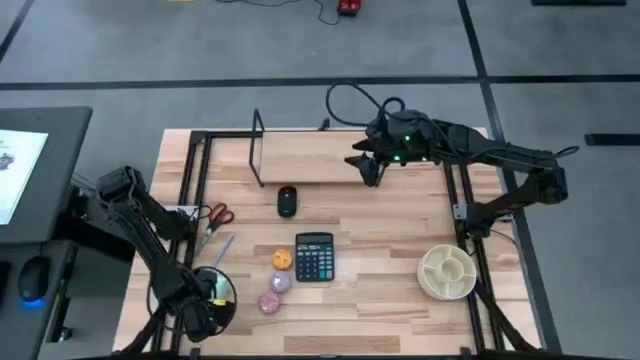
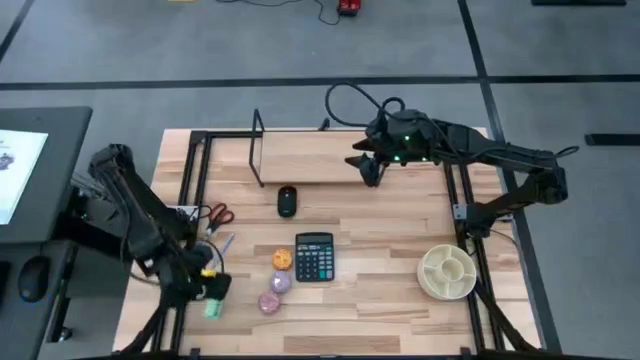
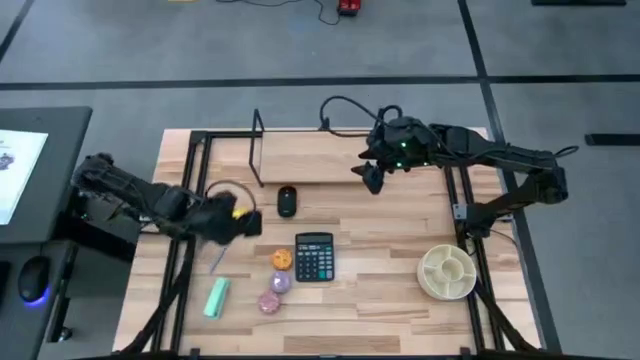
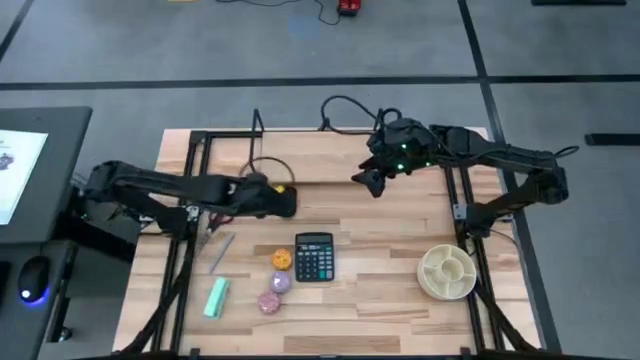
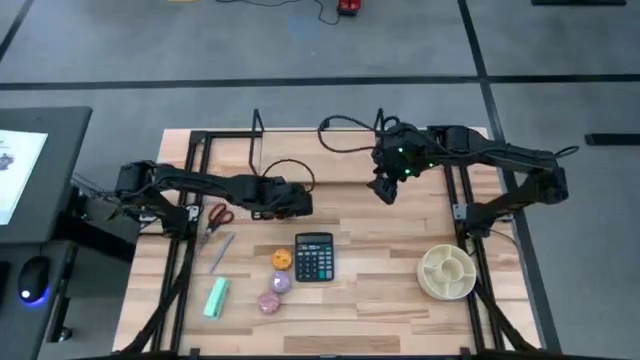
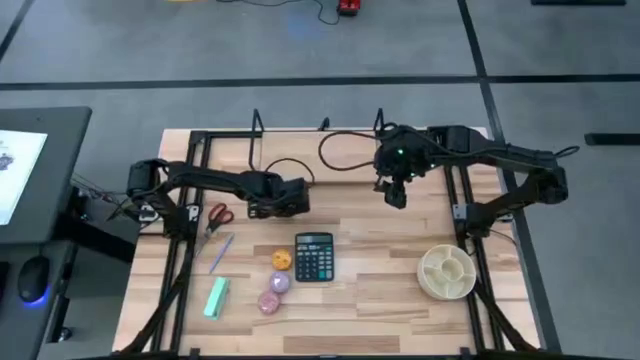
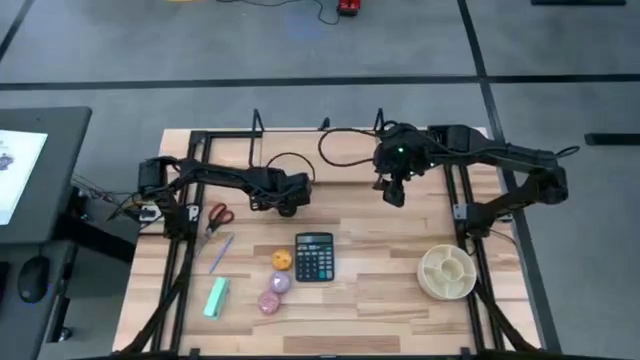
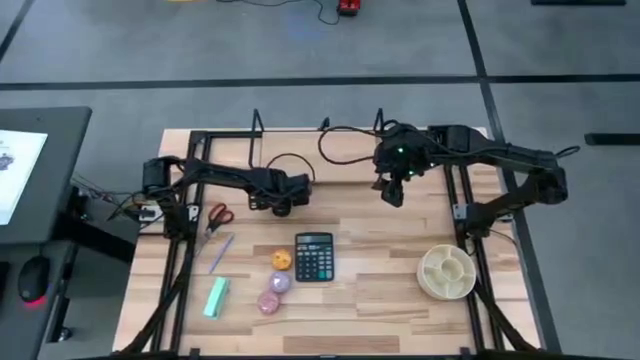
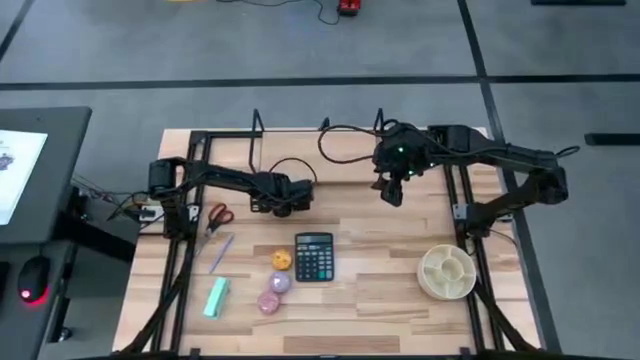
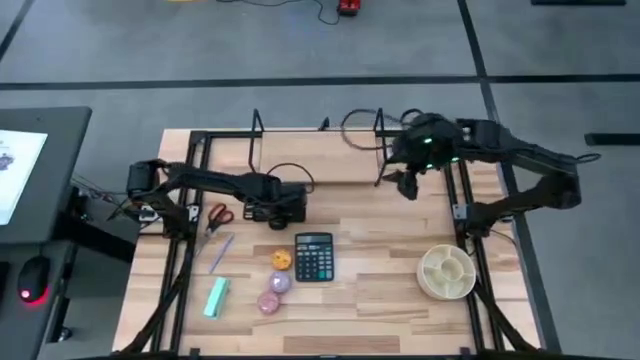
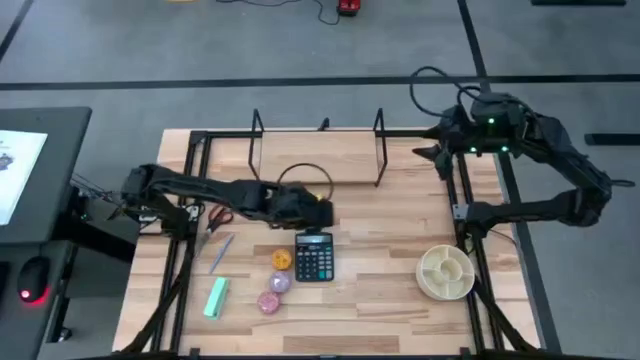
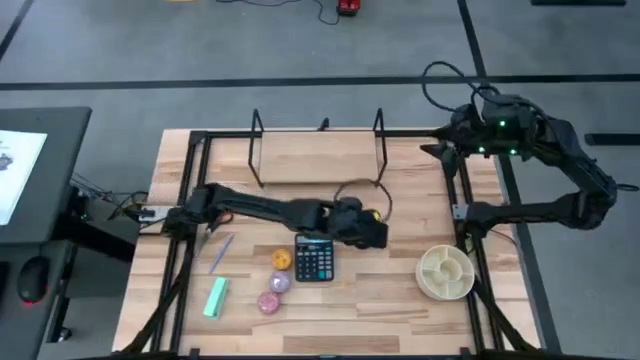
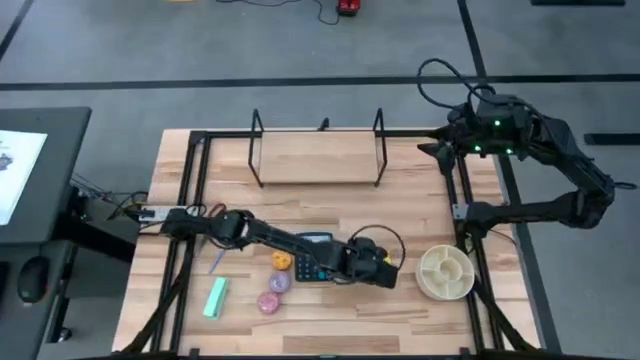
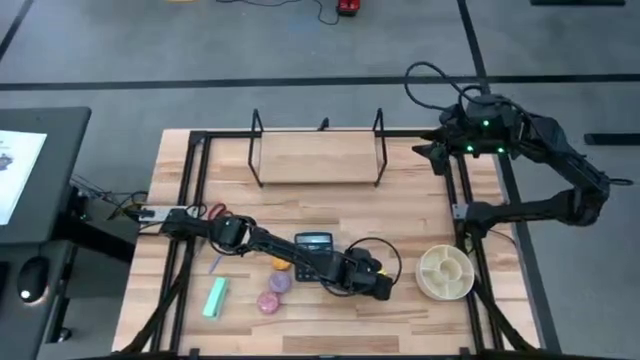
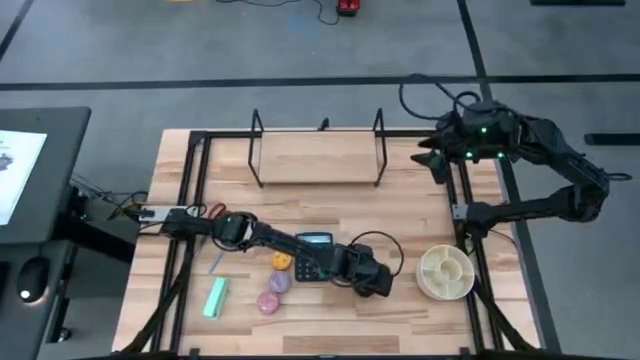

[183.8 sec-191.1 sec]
Task: Stock shelves
Remove the black mouse from the bottom left of the shelf

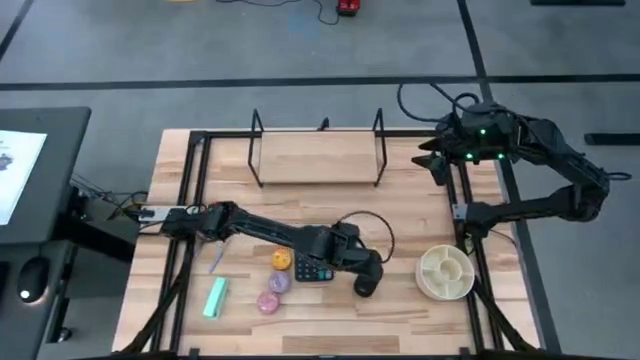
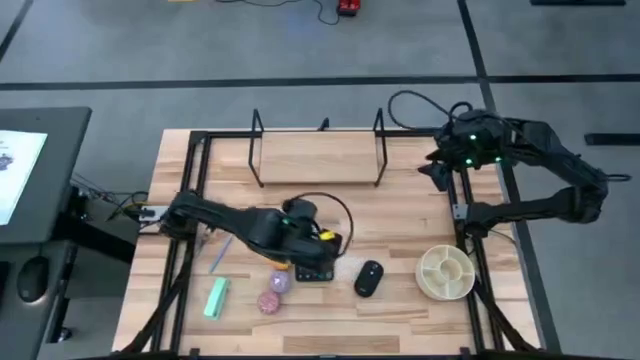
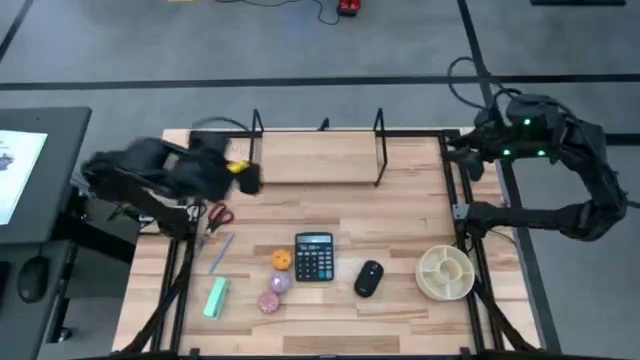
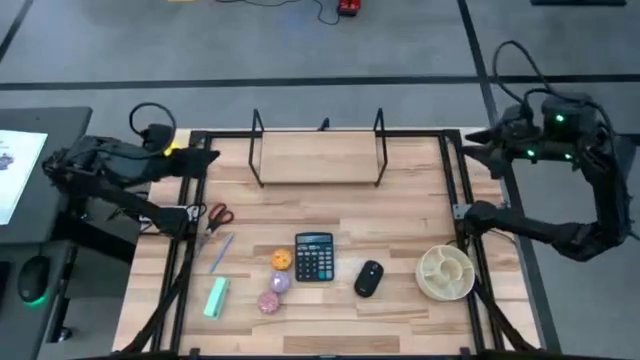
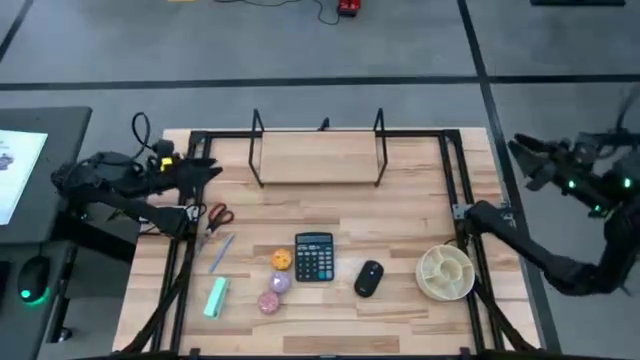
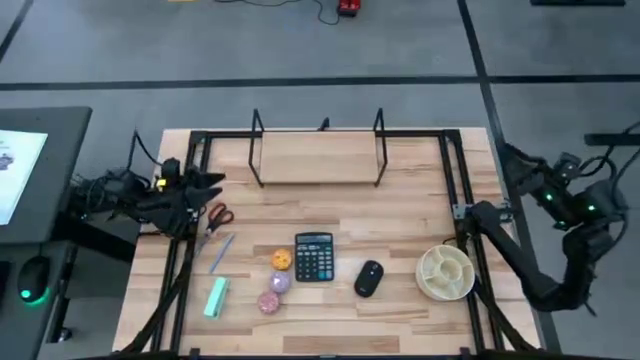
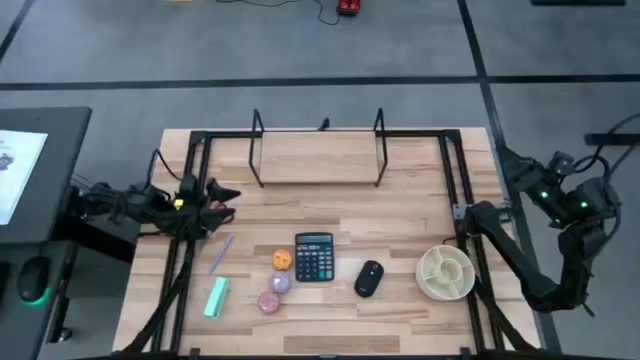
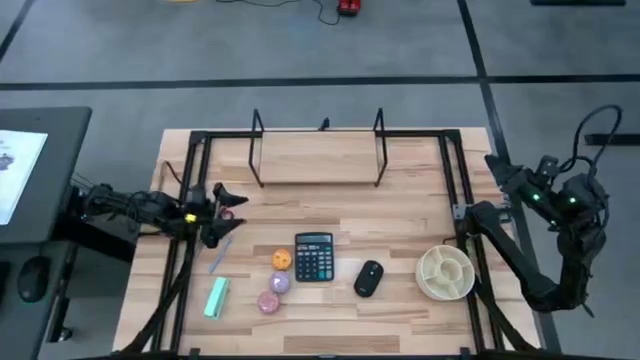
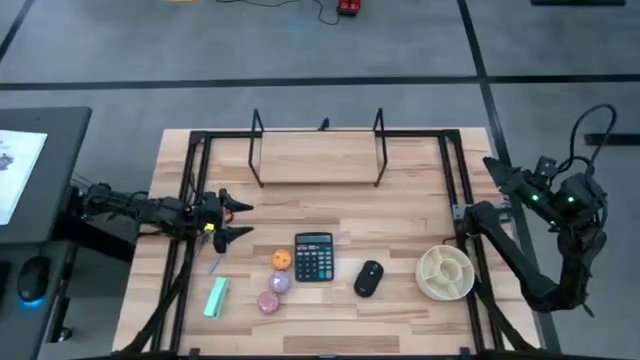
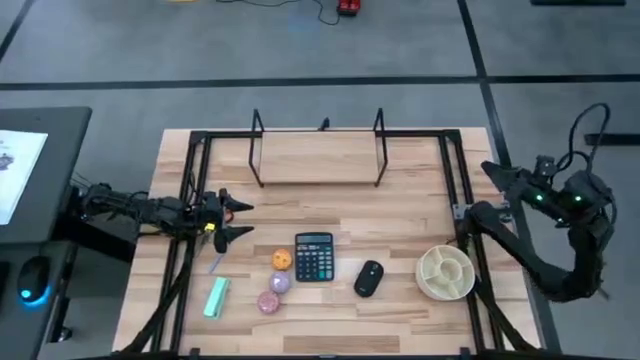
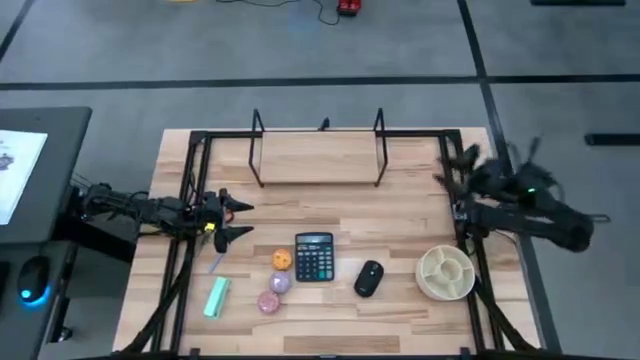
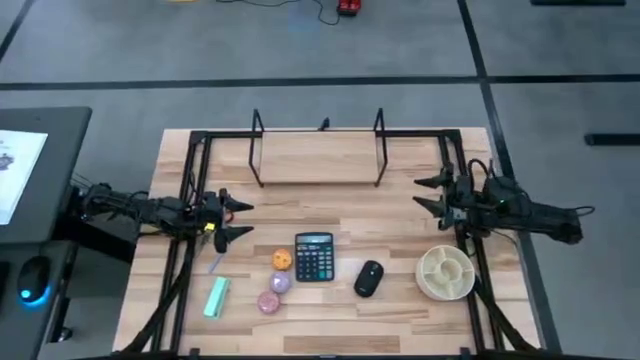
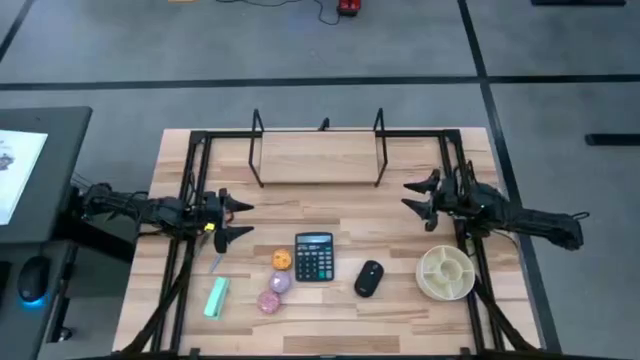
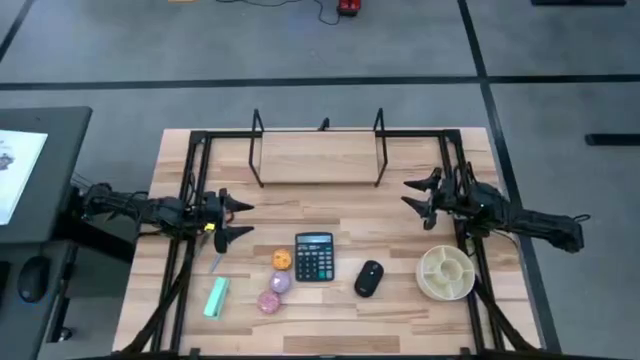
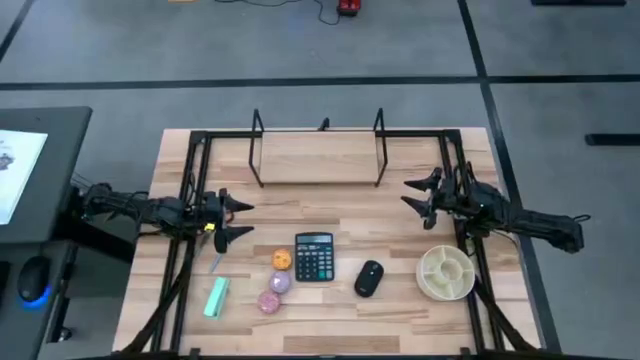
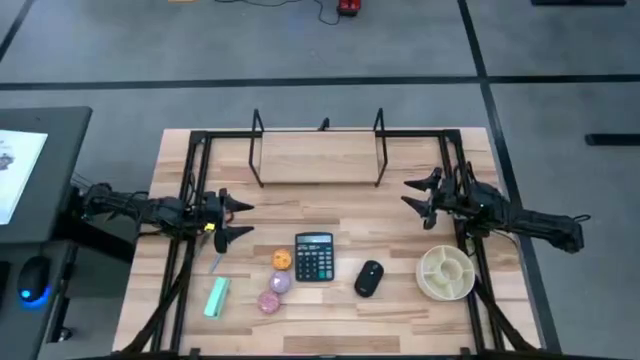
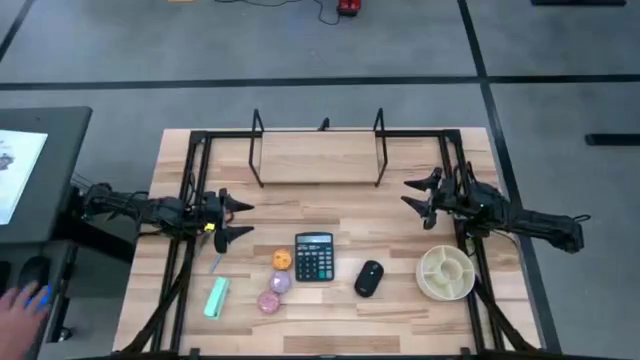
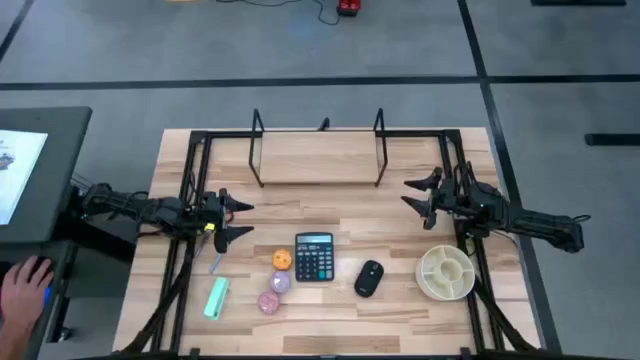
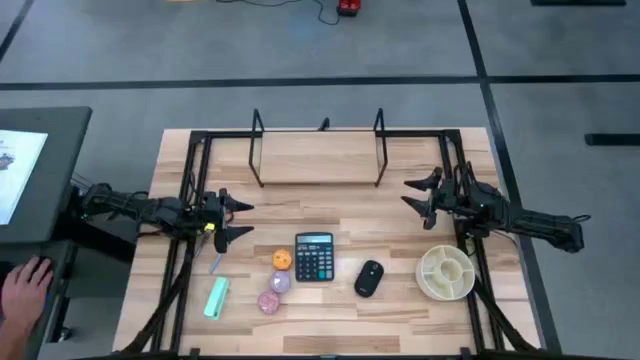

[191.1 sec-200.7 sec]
Return to Home Position

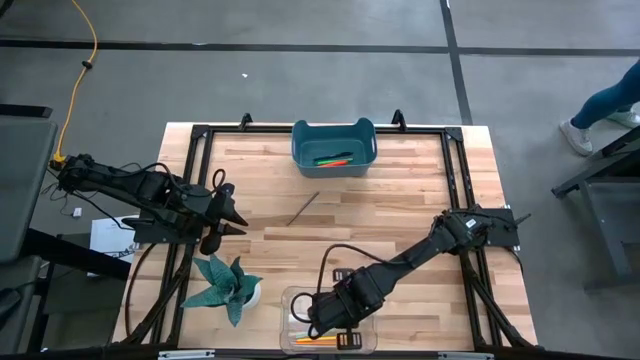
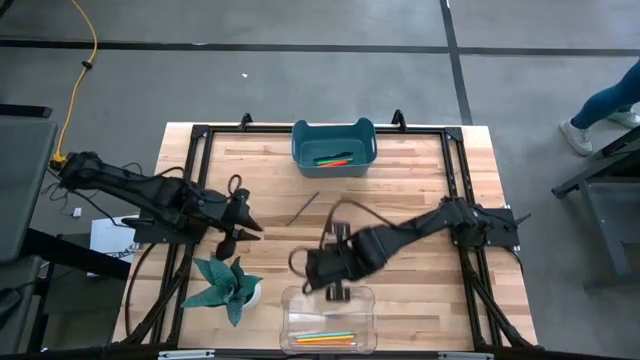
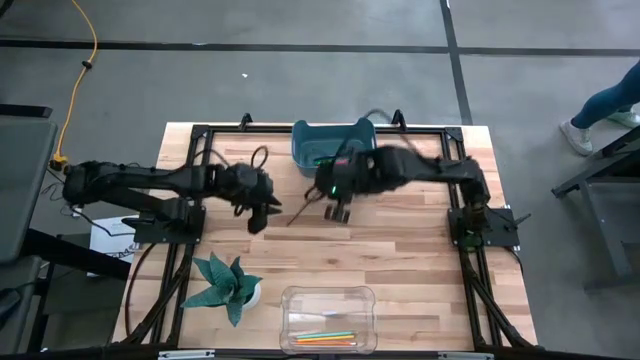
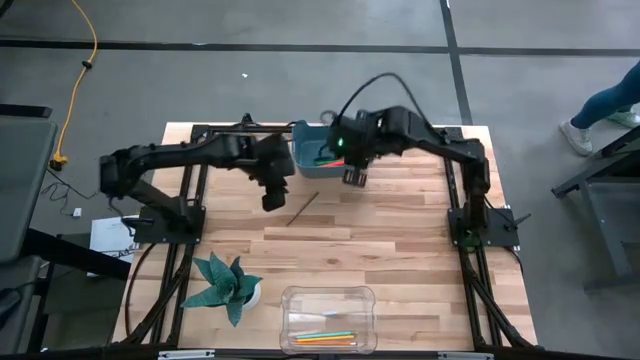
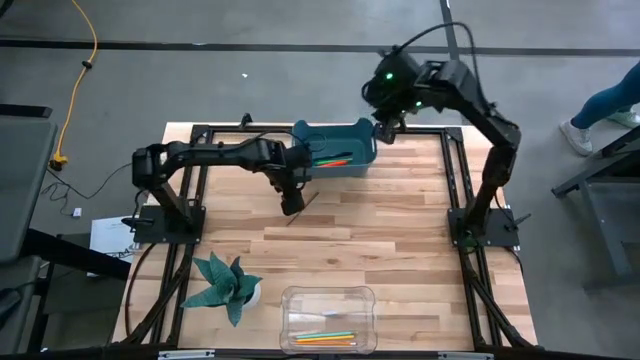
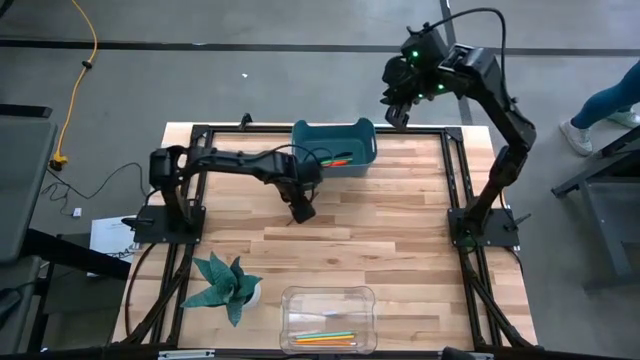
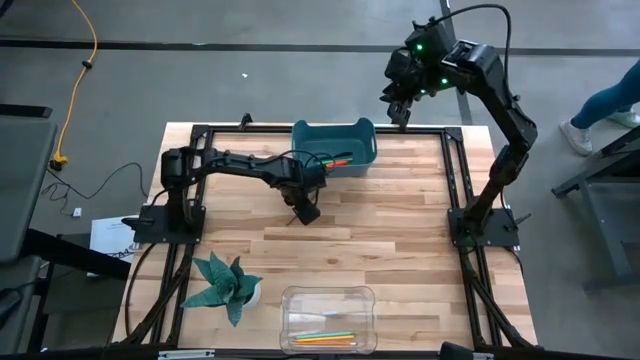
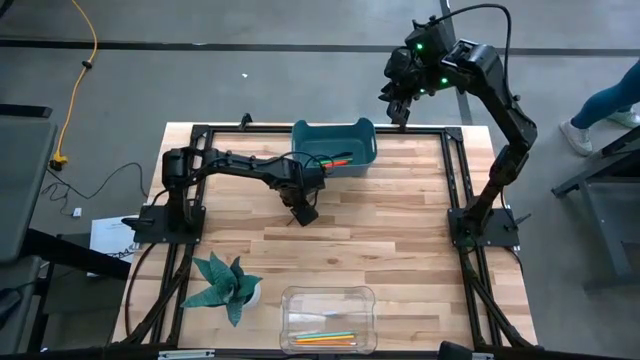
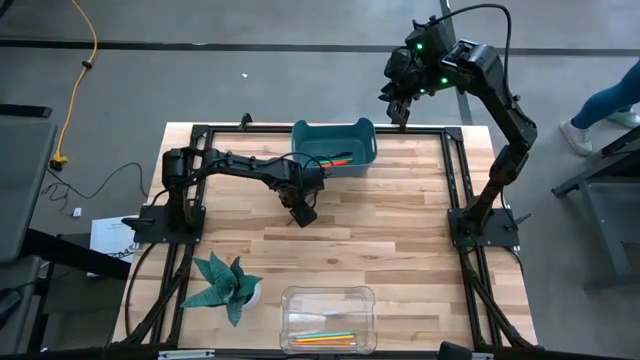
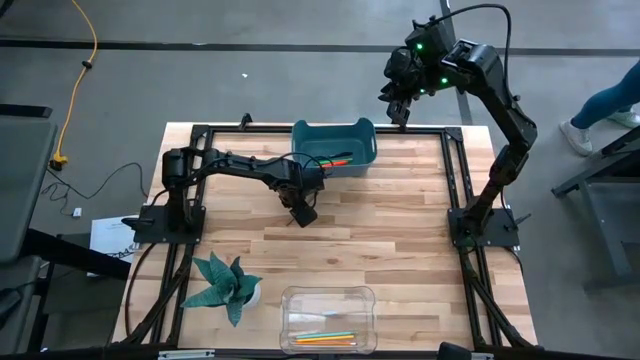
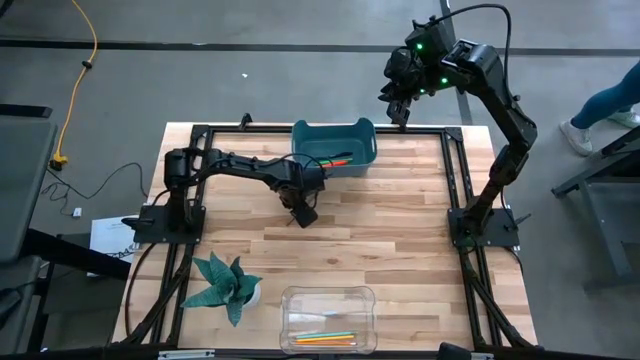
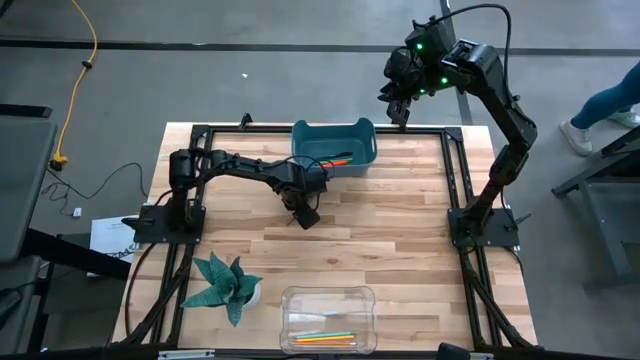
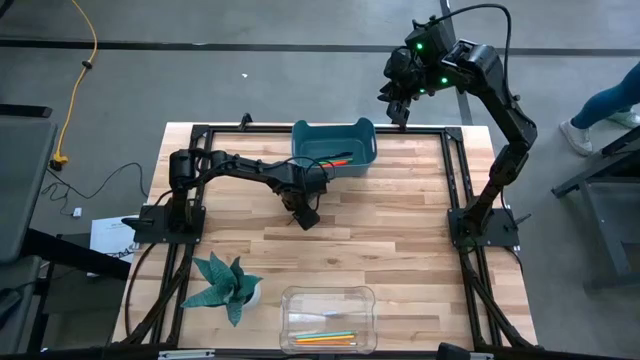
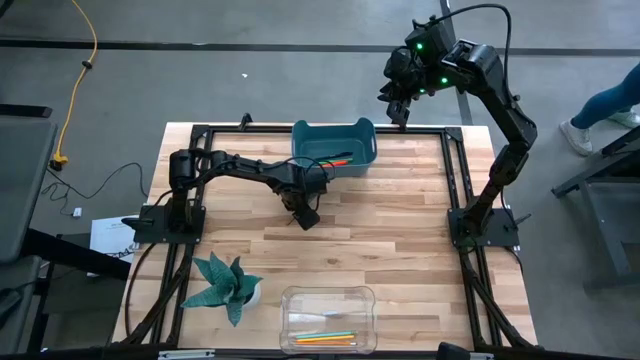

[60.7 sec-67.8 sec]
Task: Sort pens & pencils
Put the black pencil into the transparent bin
